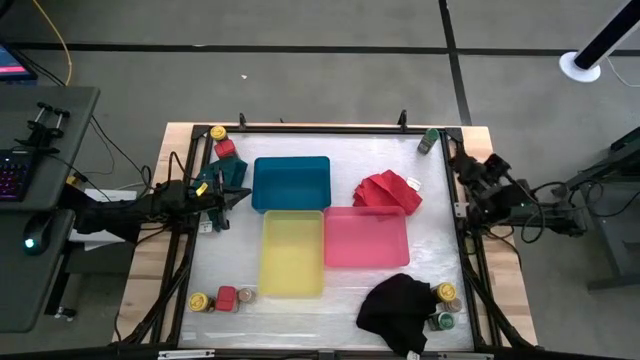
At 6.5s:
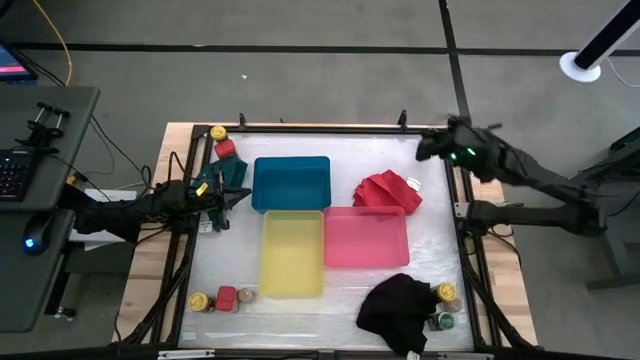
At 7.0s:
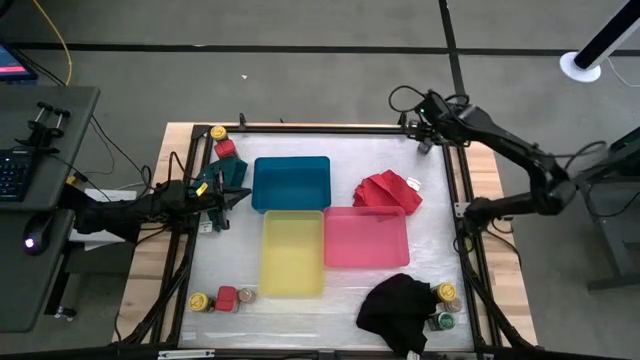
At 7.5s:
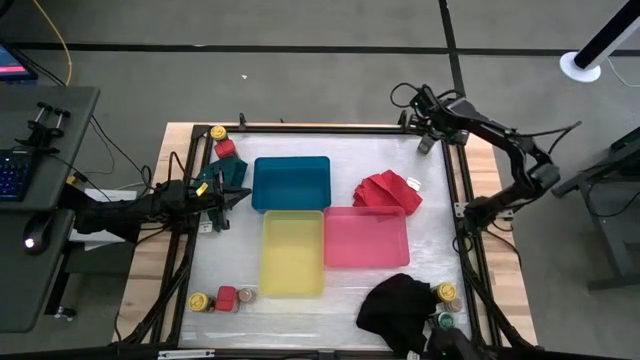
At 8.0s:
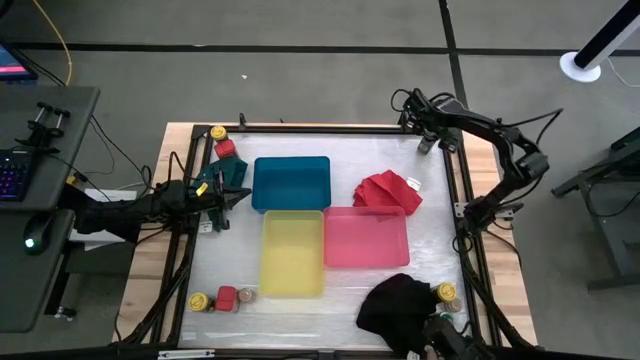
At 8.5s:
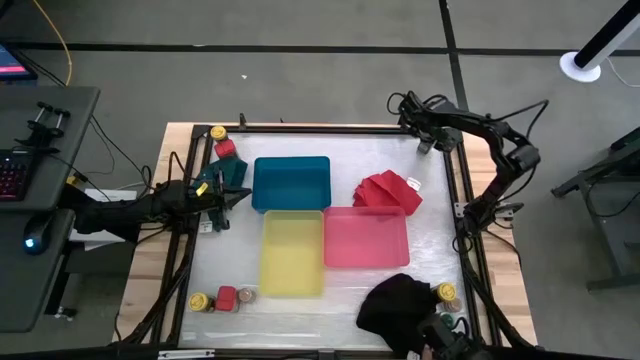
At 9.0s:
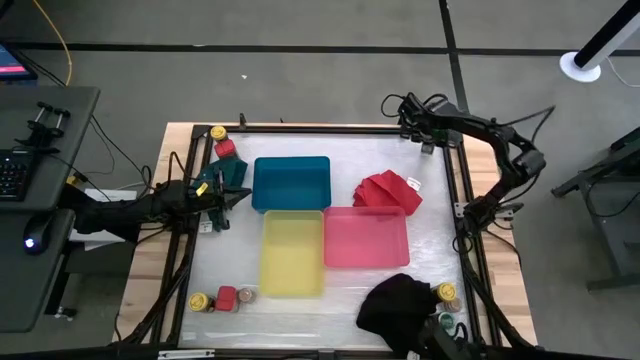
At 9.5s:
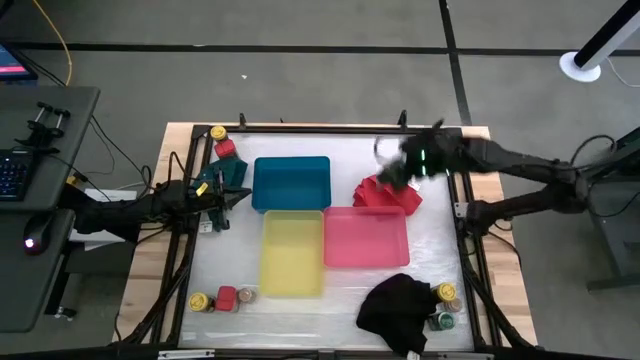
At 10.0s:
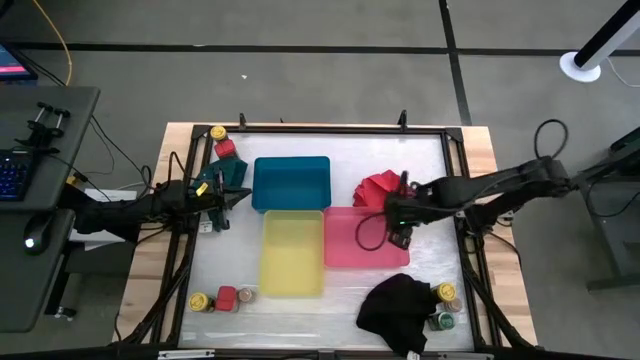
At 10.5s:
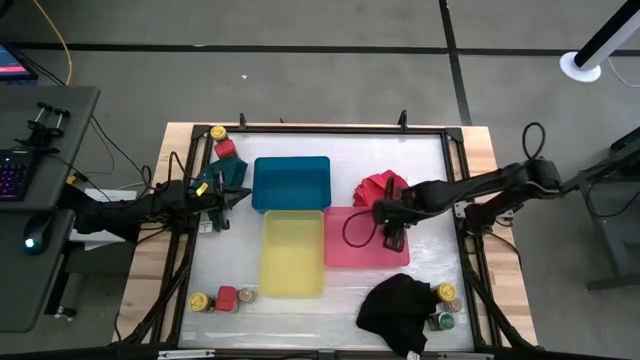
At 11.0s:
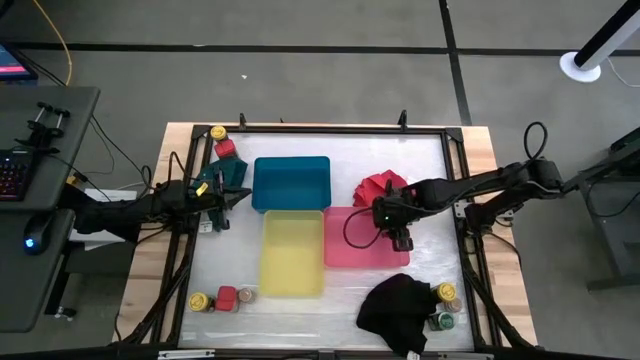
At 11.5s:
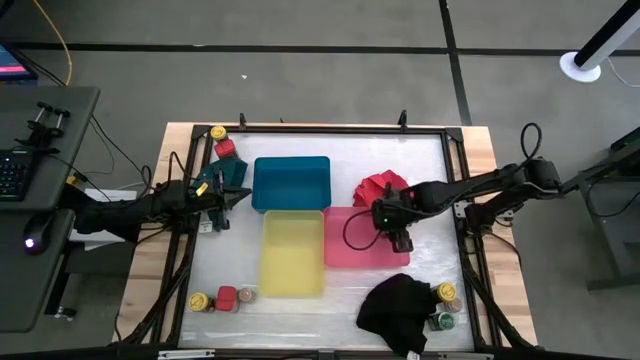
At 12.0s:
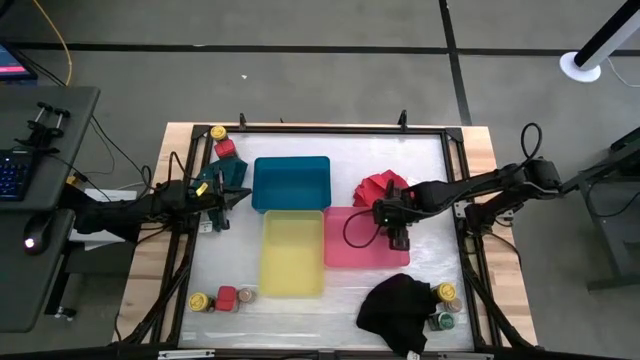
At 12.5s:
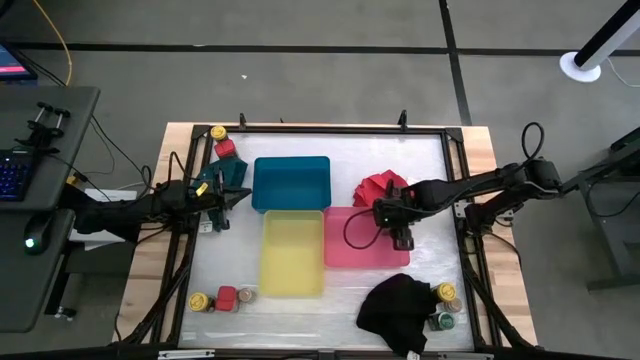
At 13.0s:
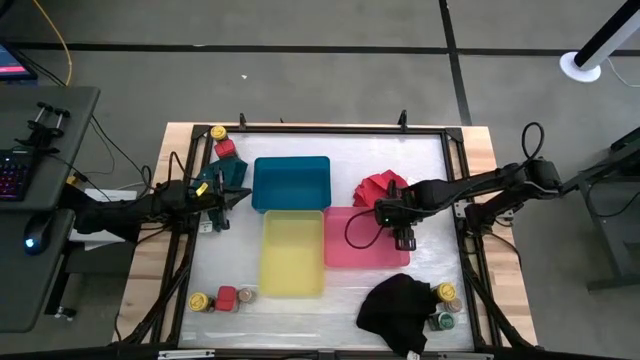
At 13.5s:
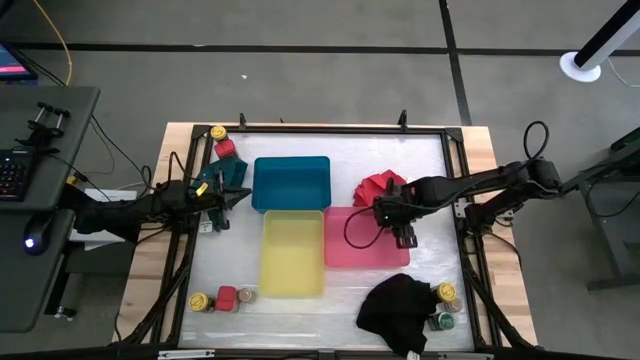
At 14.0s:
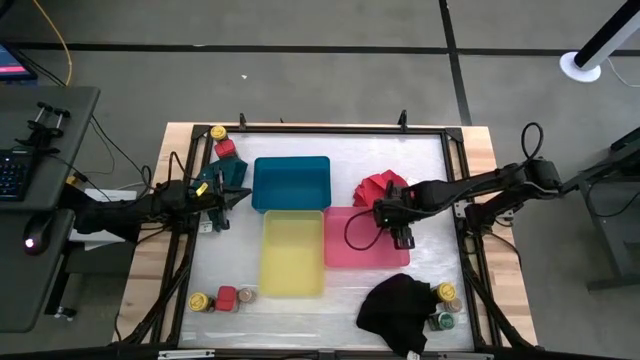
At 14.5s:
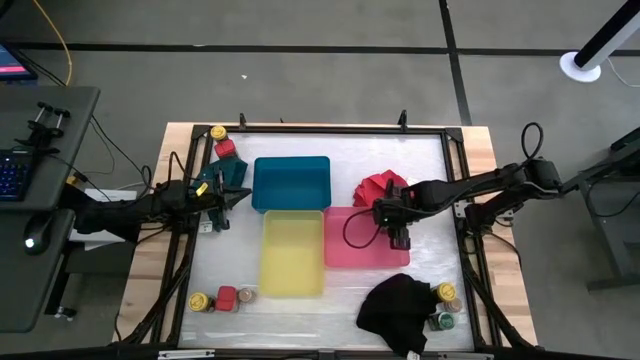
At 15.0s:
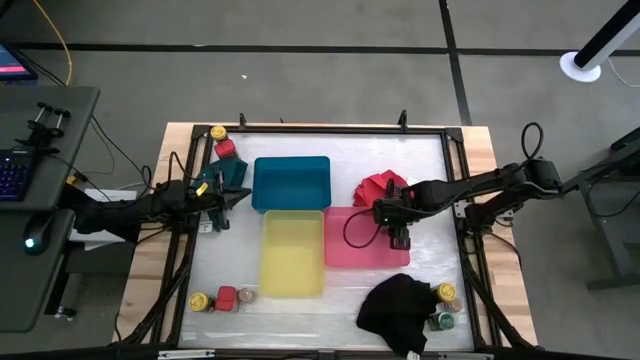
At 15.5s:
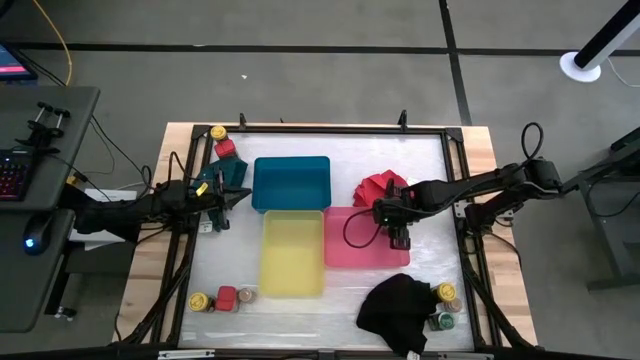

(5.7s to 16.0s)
Task: Sort spices by type
Put the green spice bottle into the pink bin

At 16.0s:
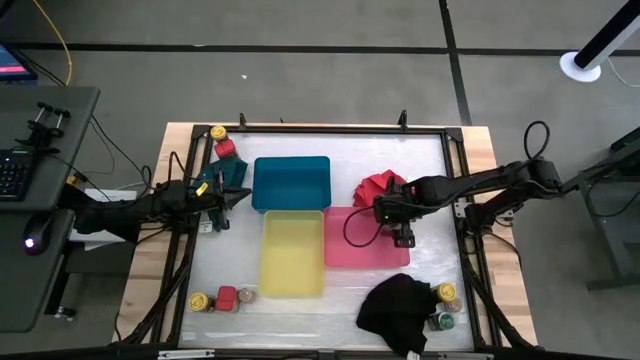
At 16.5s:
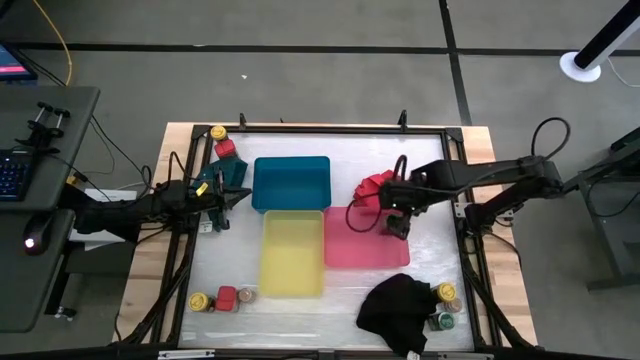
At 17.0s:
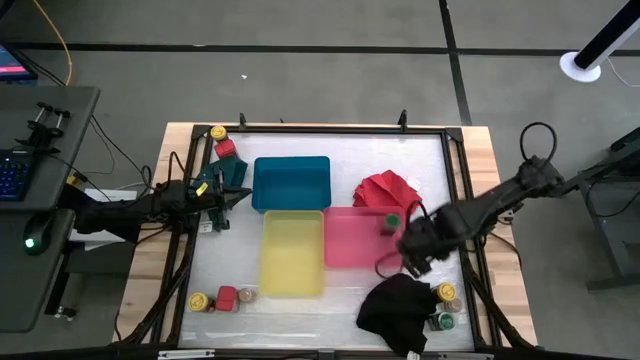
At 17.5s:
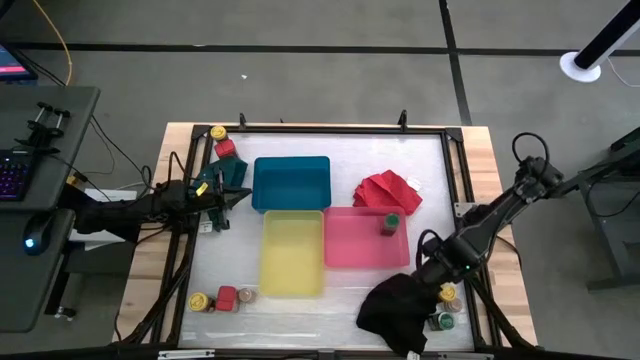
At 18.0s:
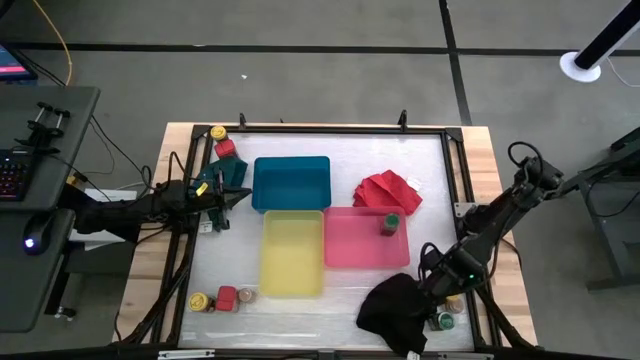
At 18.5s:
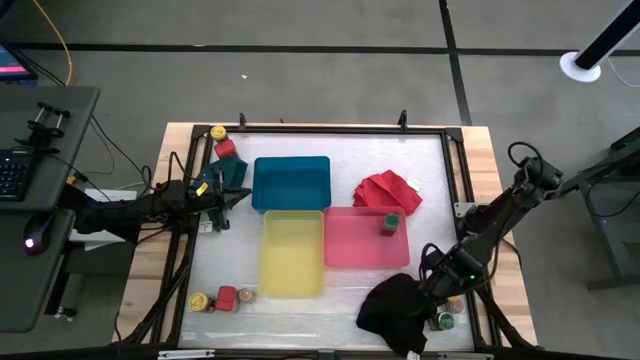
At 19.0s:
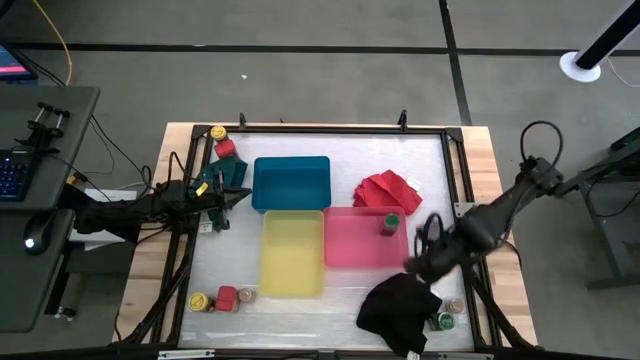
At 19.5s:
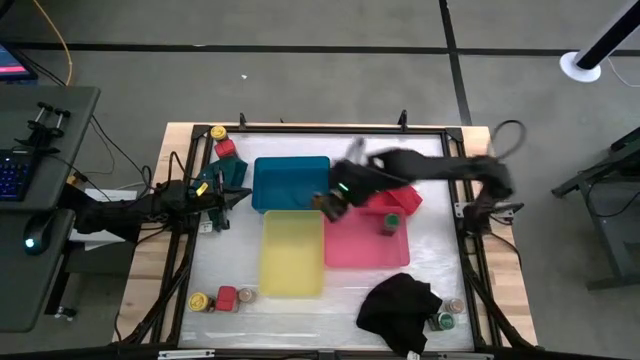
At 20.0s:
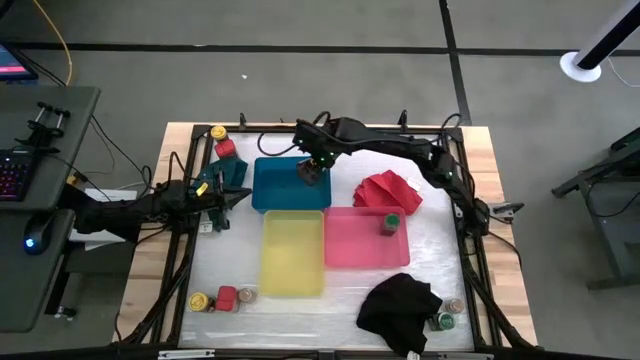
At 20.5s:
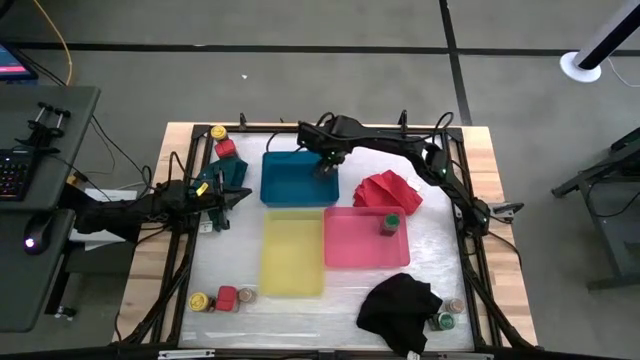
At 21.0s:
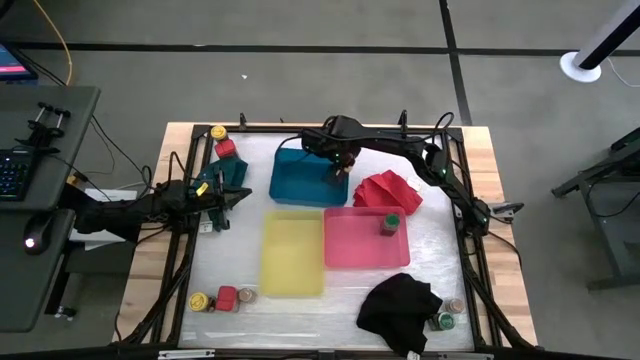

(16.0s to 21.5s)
Put the yellow spice bottle into the blue bin

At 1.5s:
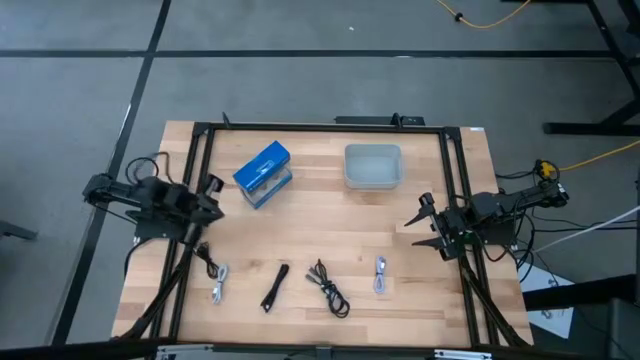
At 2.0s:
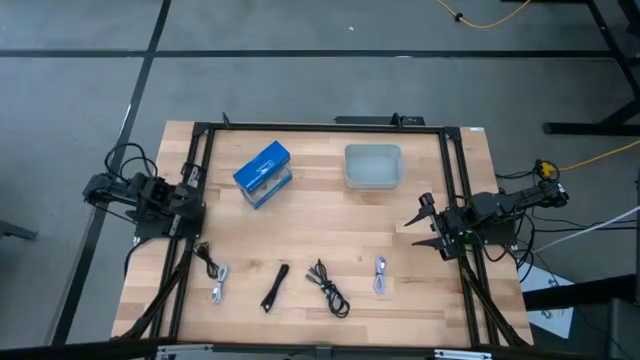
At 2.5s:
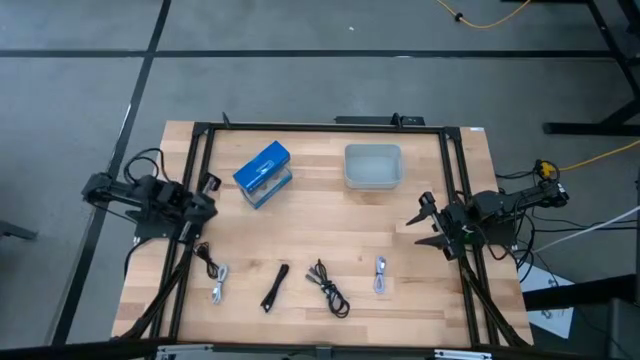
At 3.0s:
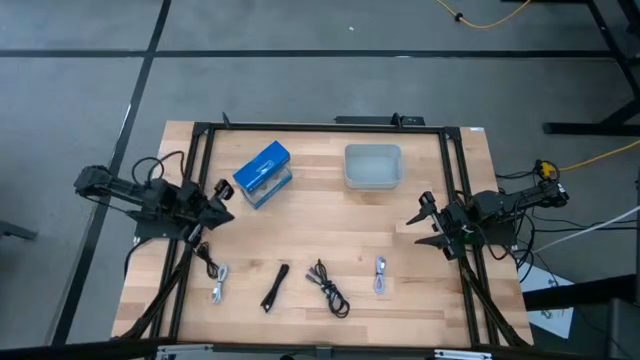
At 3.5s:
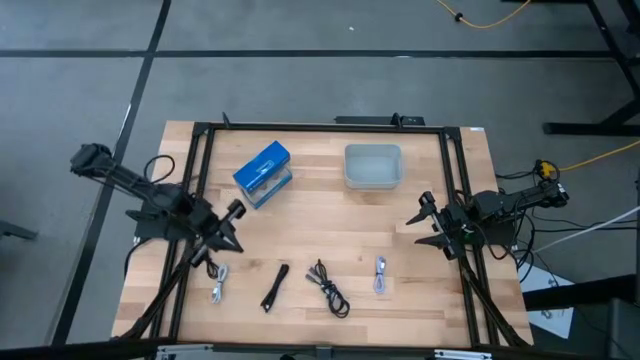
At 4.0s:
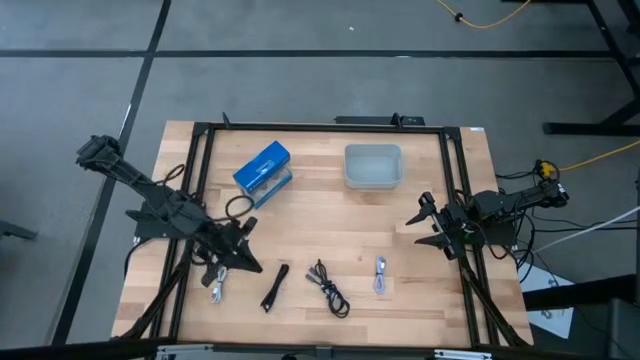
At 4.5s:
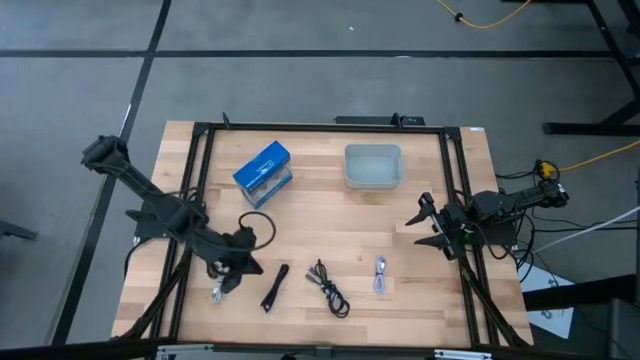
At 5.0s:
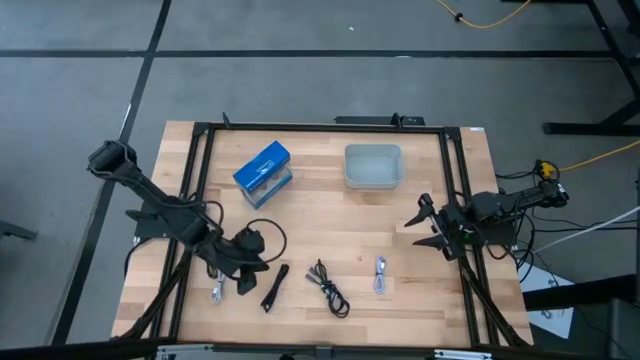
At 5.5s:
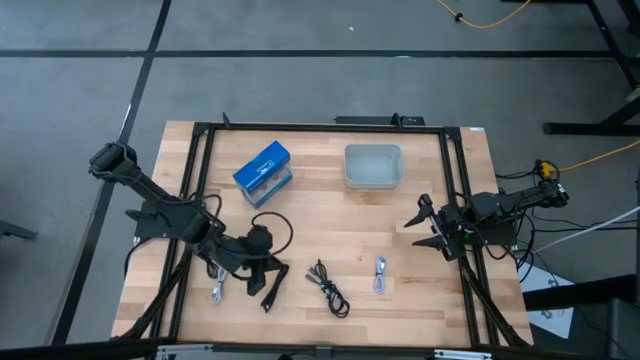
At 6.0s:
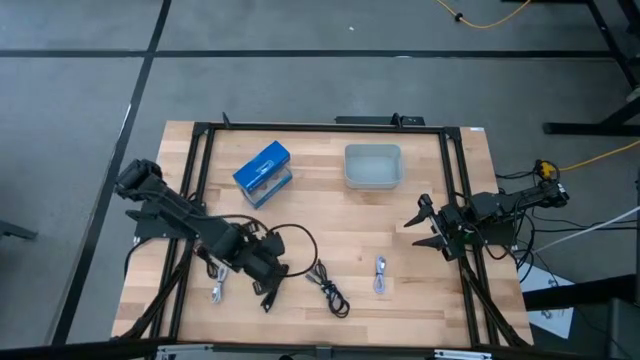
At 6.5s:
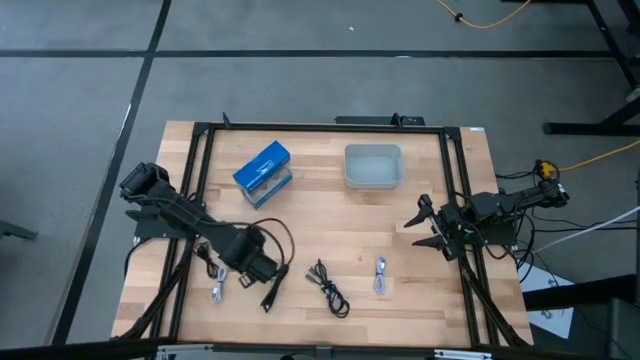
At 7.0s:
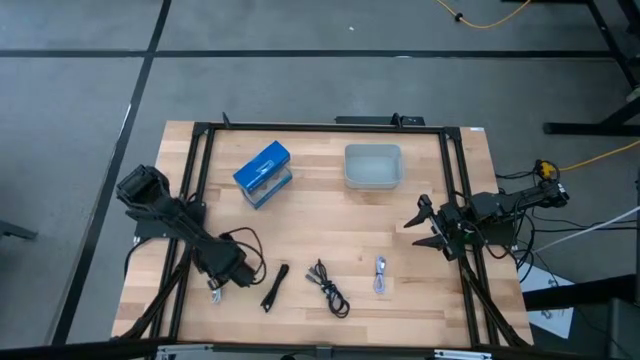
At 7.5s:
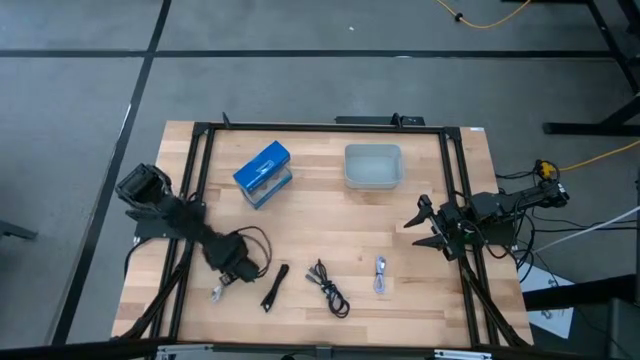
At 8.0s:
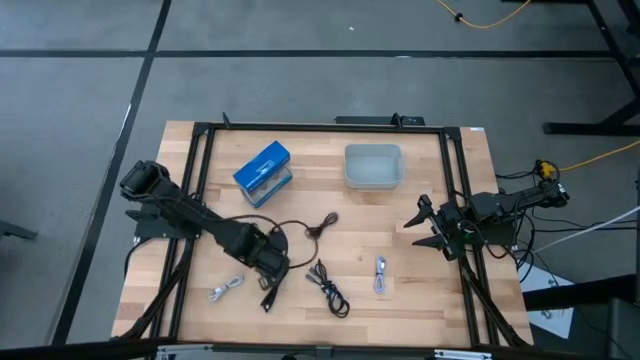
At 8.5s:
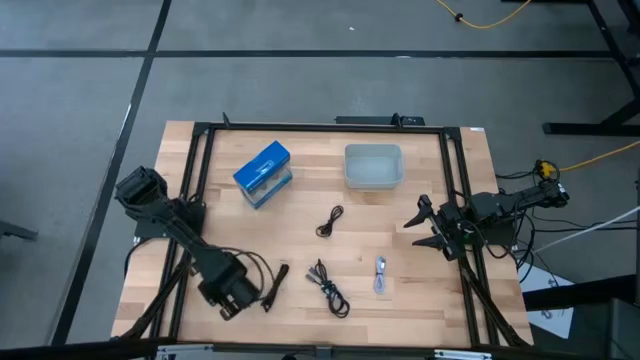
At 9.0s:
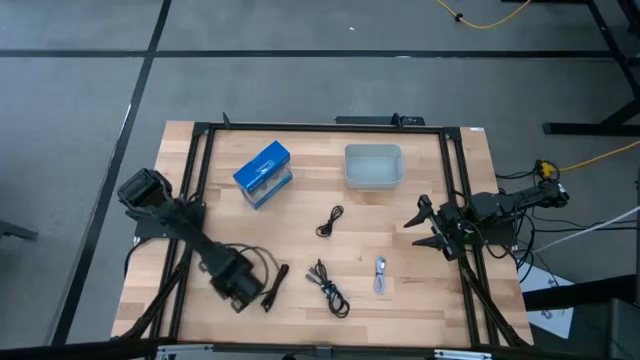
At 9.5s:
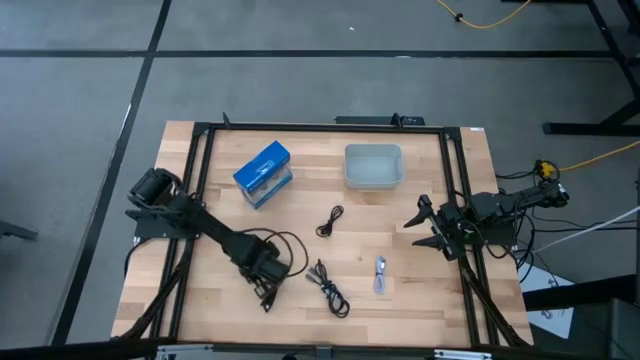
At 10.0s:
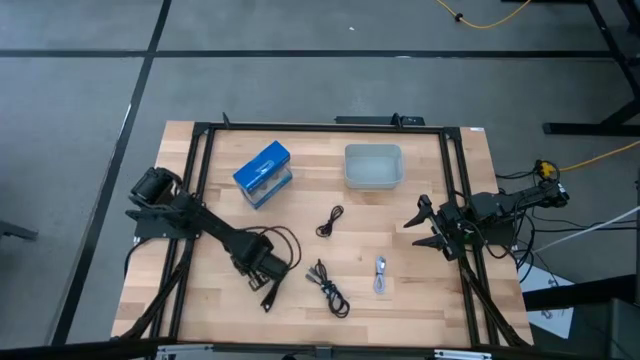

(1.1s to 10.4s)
Task: Pick and place USB-C Cables
Move the charger cables to the center of the table
